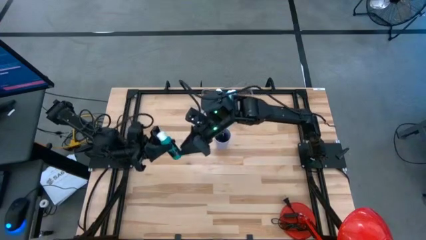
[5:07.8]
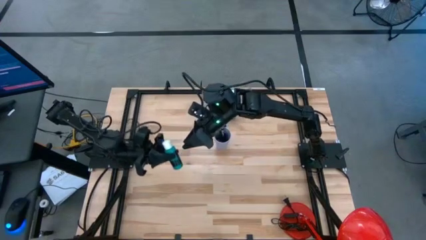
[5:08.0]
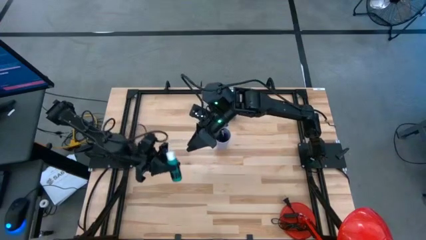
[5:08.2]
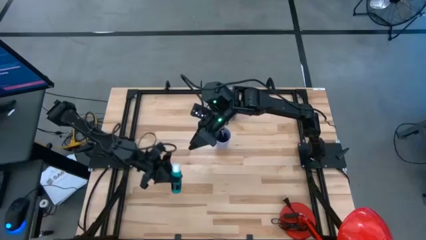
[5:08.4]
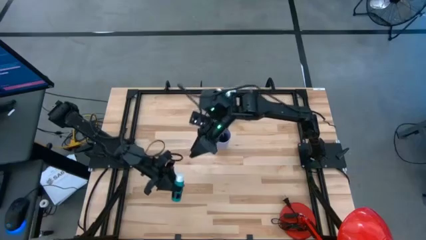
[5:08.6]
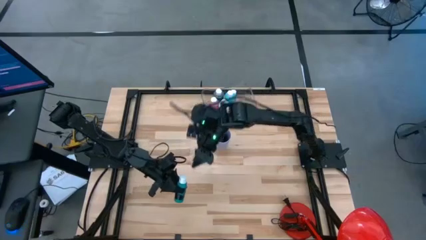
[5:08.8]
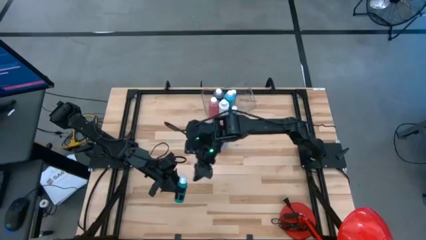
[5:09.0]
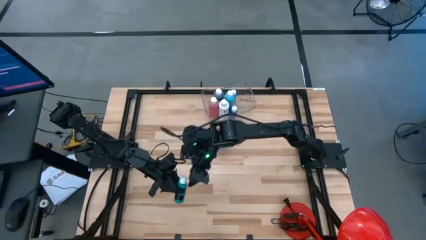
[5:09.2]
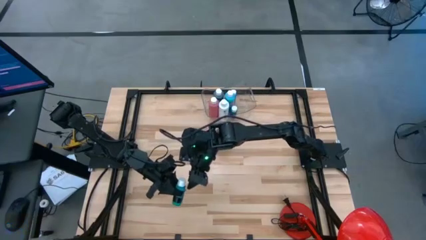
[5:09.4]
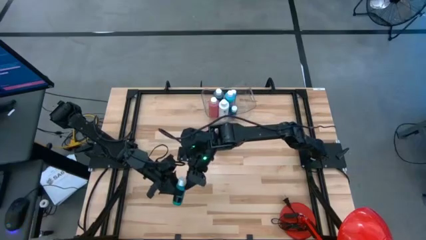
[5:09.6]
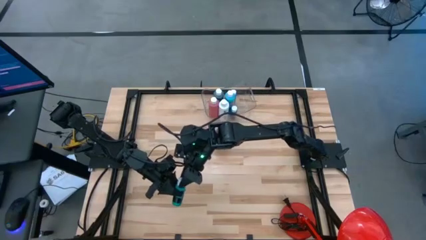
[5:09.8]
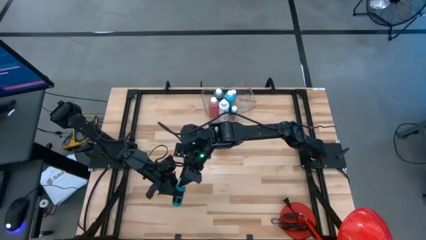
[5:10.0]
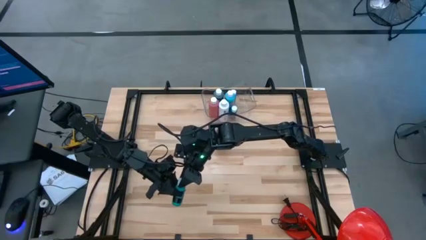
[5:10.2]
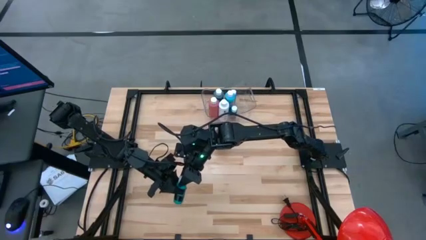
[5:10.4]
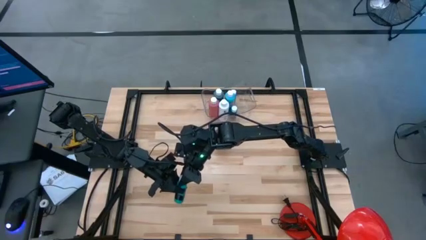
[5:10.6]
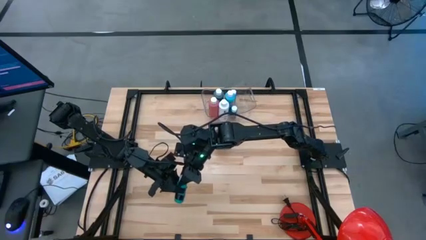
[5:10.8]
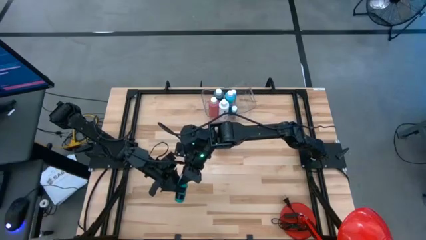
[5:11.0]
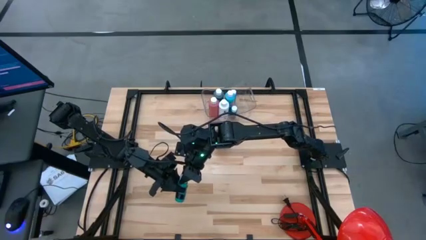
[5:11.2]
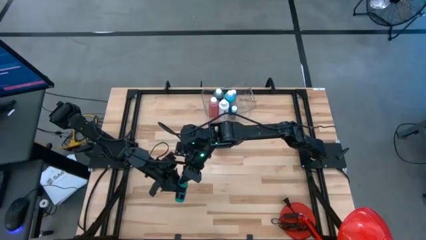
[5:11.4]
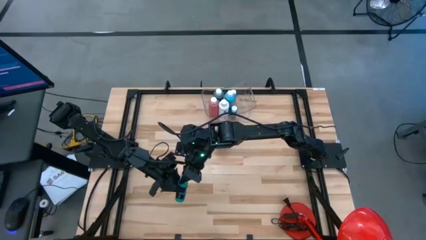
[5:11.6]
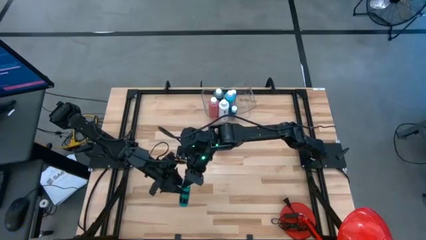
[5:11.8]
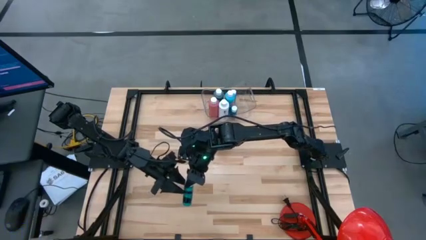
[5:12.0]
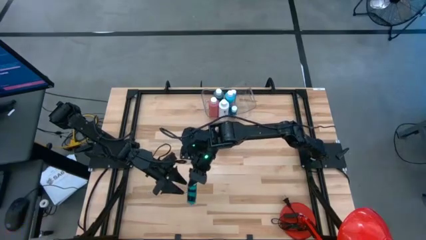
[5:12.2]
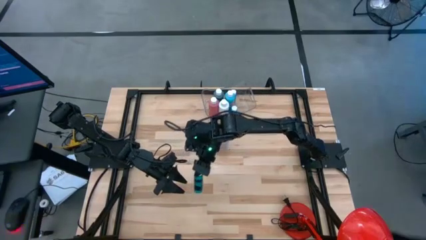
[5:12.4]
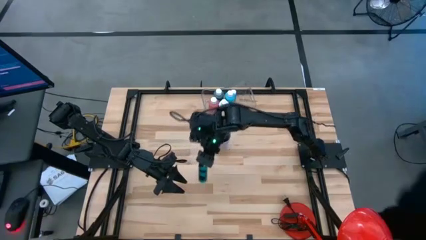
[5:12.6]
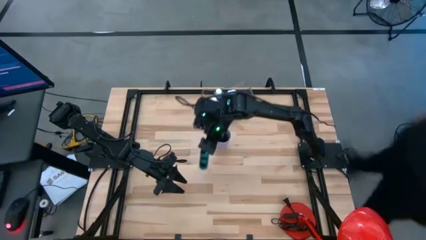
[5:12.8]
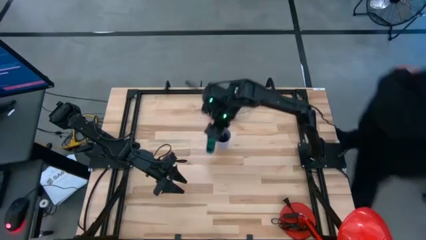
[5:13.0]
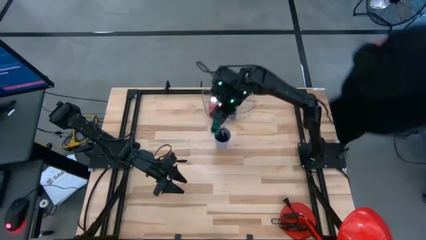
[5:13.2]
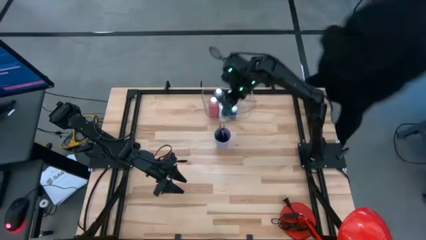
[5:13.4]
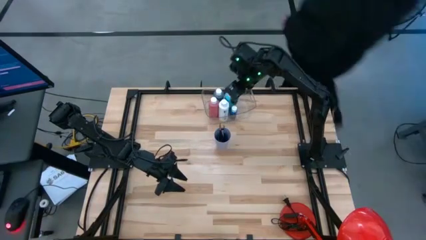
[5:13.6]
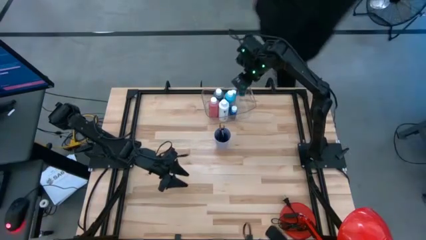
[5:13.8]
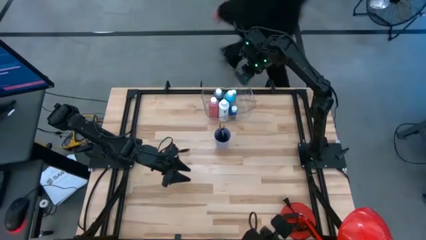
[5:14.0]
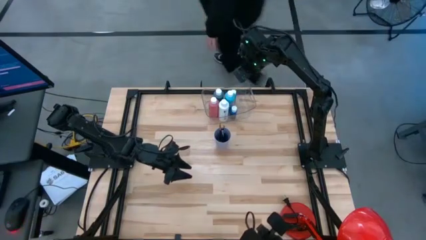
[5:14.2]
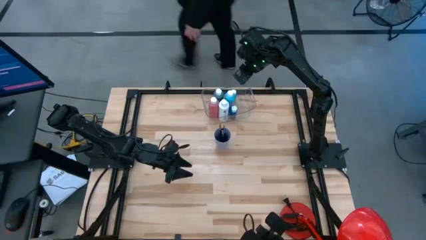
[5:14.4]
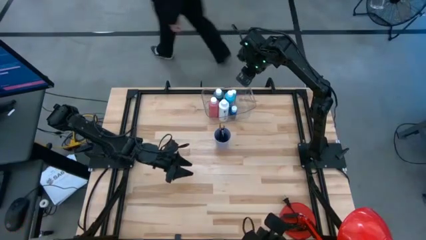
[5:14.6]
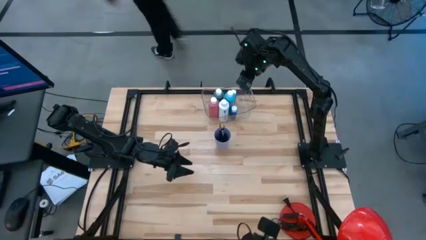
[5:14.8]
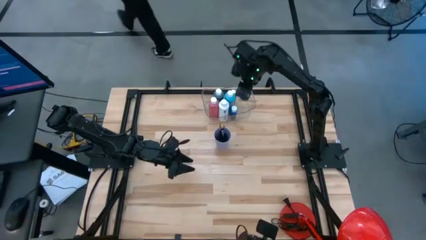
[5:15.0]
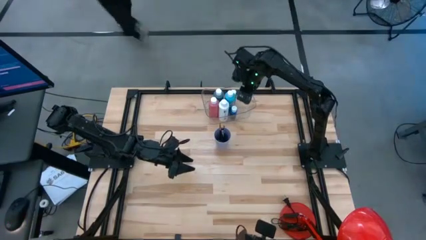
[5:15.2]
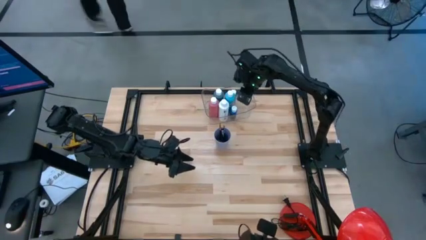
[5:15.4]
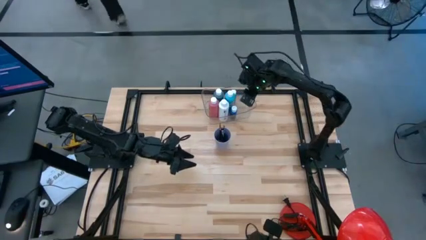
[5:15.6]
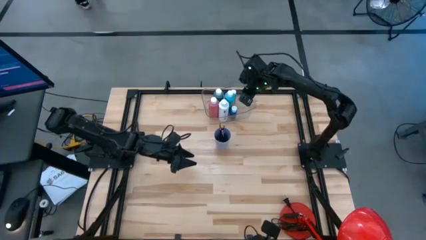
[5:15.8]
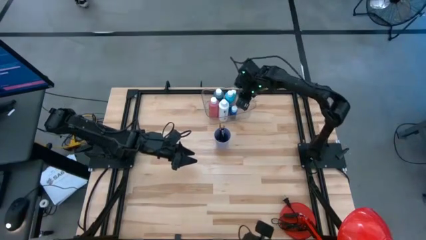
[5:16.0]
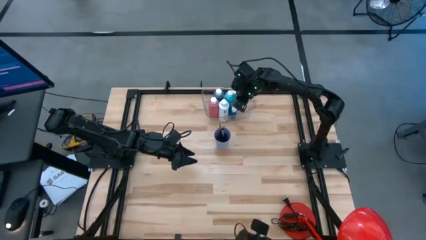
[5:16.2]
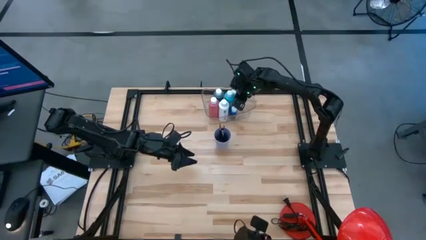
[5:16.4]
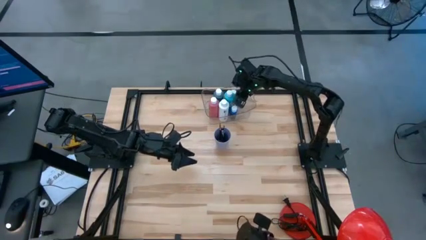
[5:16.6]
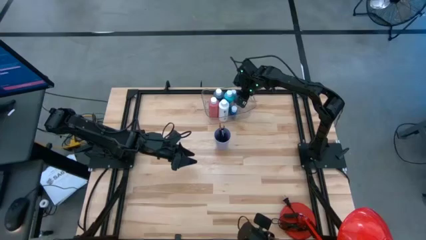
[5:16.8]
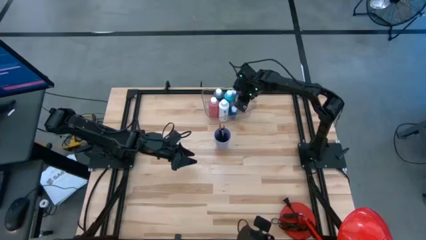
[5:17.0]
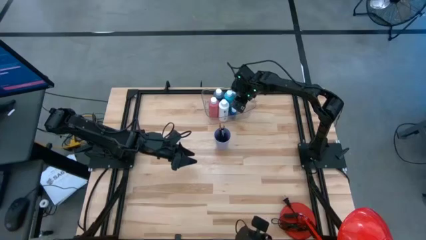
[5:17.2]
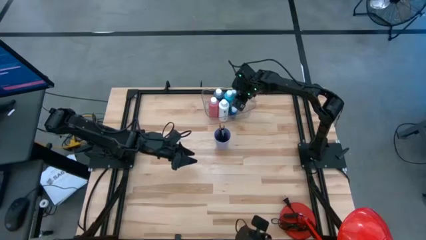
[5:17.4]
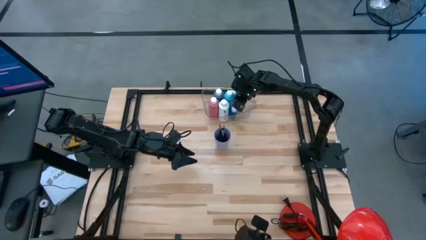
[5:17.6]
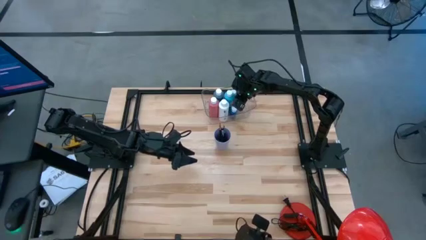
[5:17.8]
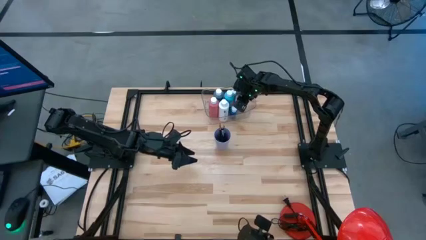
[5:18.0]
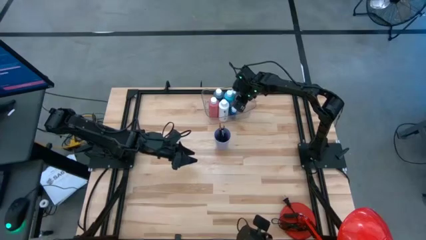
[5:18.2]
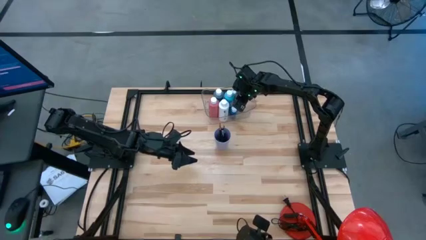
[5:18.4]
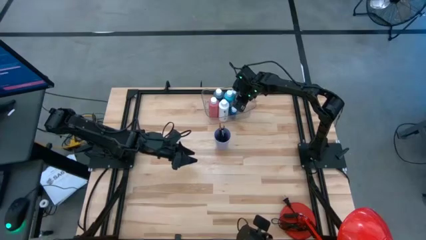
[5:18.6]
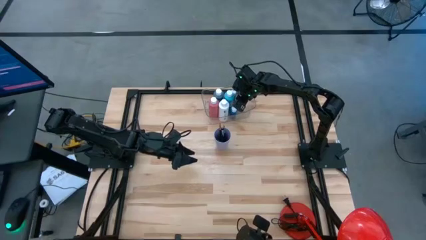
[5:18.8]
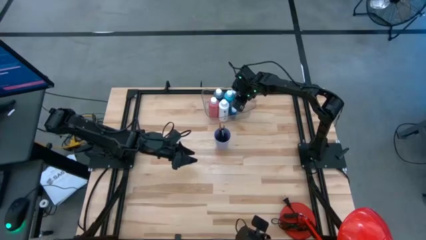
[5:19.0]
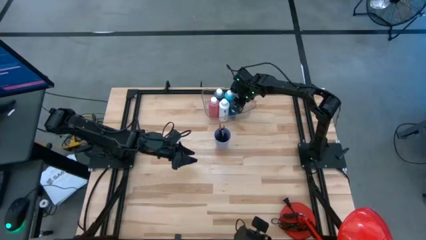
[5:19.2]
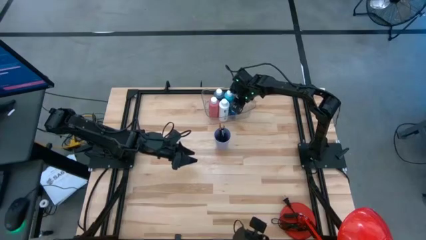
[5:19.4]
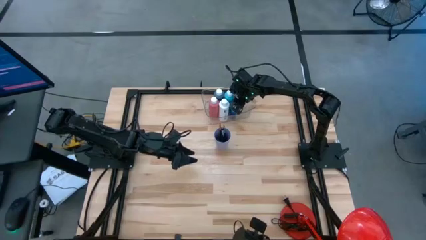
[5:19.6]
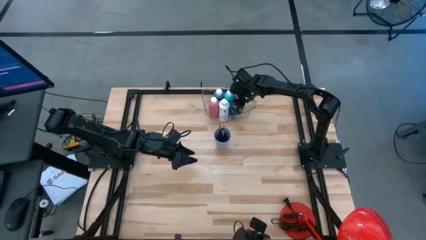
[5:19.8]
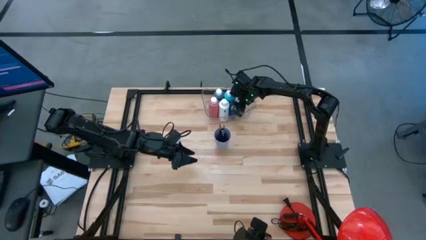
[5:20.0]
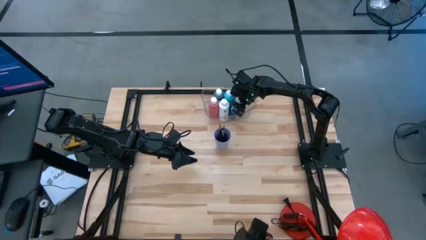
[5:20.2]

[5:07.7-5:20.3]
Task: Pick & Place Paint Supplies
Put the green paint bottle into the transparent bin

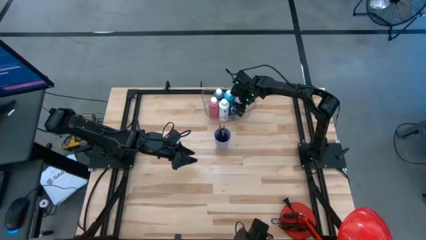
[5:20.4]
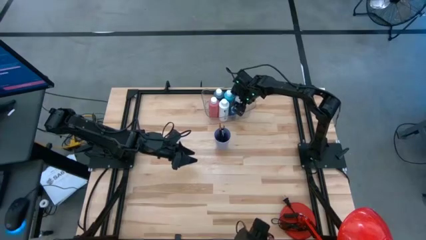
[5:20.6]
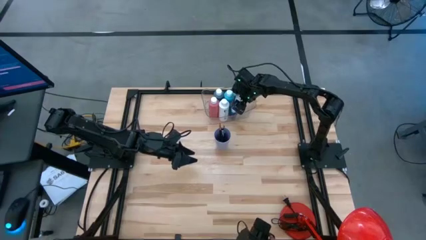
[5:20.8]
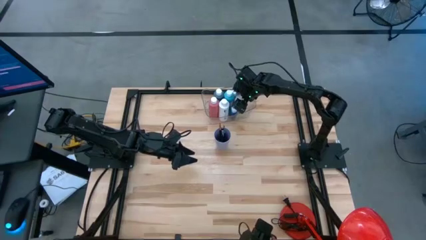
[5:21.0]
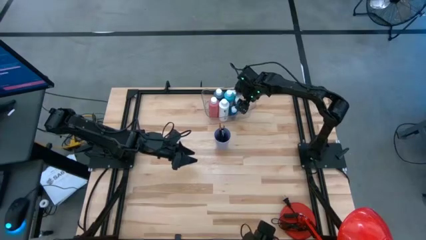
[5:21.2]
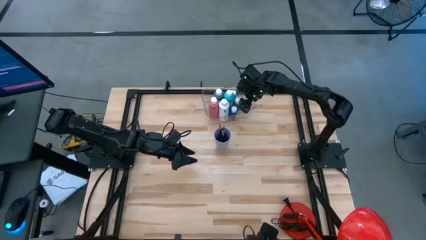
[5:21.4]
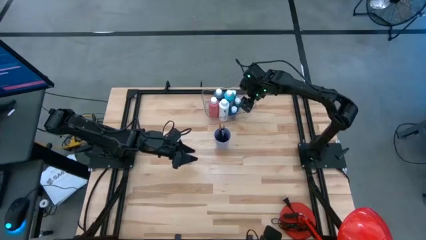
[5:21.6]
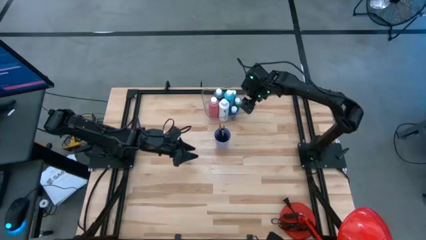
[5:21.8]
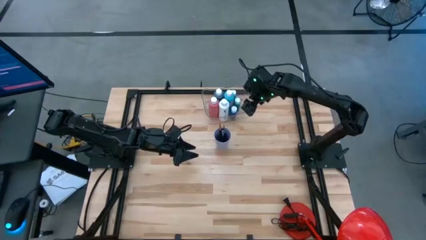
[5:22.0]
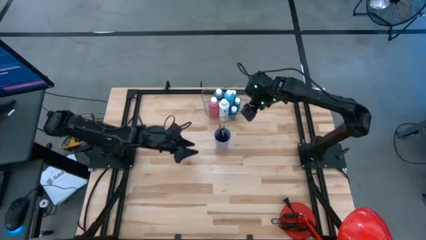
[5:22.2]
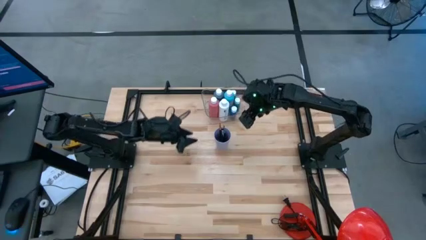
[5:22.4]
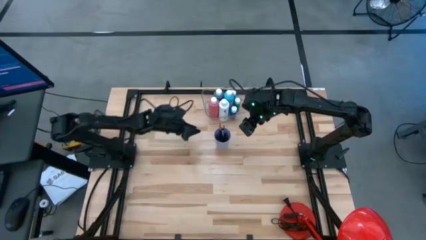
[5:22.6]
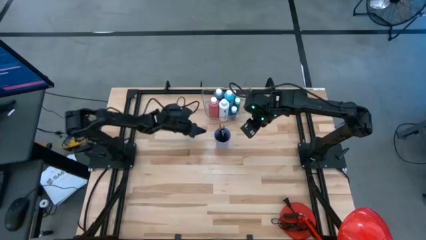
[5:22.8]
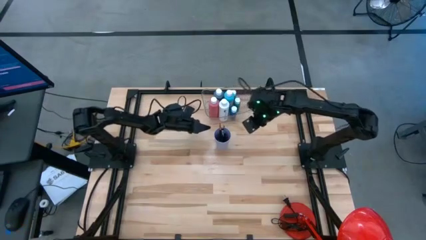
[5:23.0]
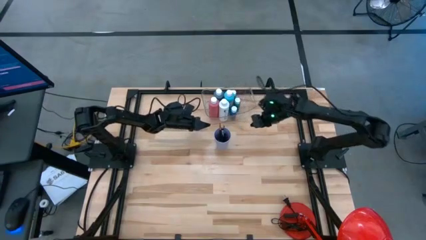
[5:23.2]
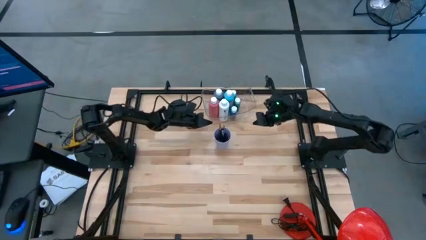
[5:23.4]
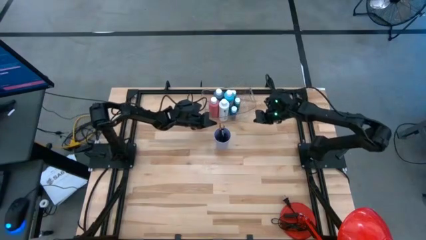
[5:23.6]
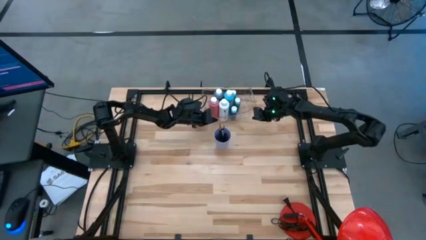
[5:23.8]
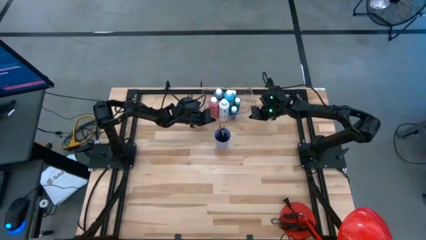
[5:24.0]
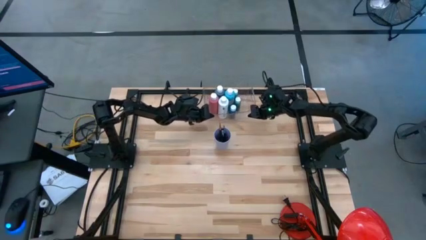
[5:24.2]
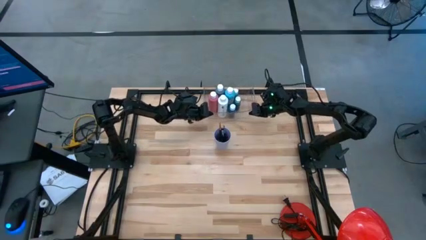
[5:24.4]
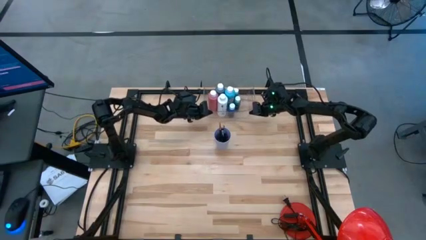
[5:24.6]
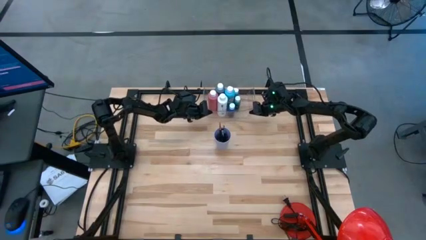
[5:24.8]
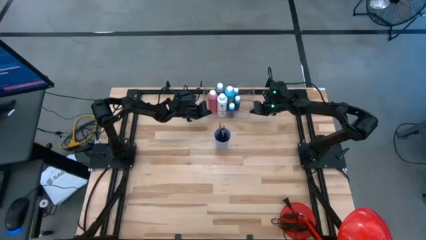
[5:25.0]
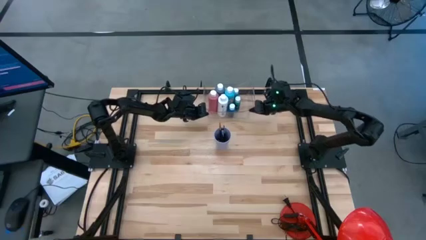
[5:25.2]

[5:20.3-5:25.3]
Adjust the transparent bin
